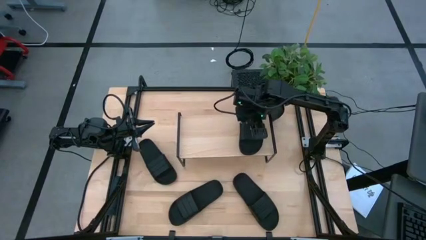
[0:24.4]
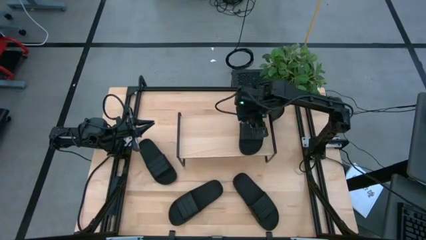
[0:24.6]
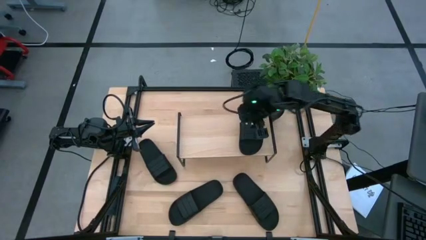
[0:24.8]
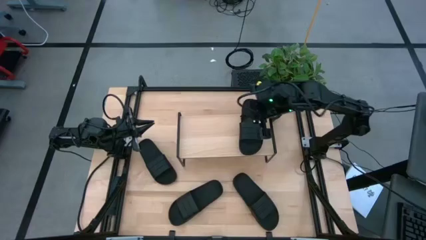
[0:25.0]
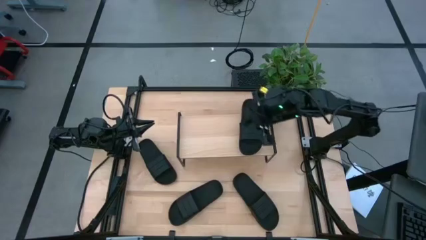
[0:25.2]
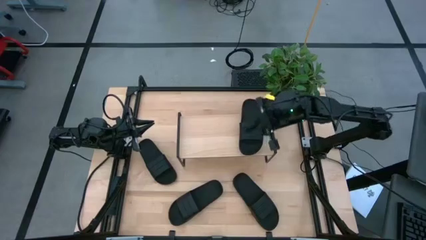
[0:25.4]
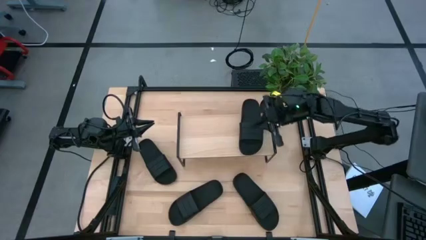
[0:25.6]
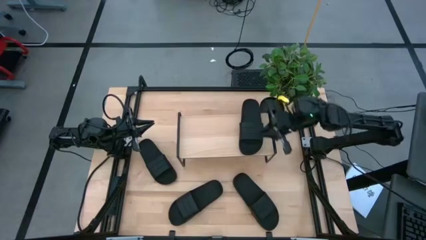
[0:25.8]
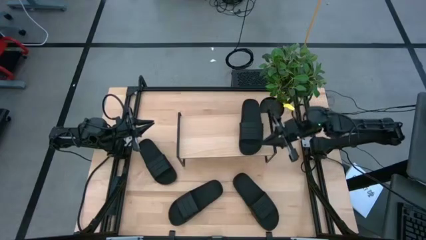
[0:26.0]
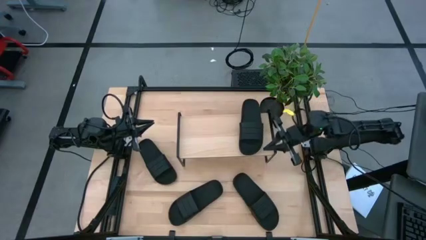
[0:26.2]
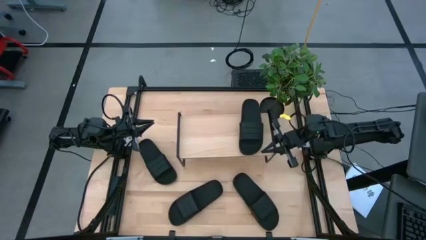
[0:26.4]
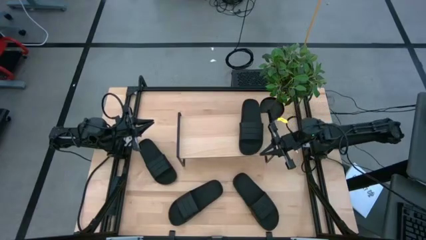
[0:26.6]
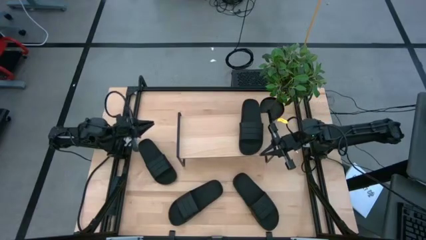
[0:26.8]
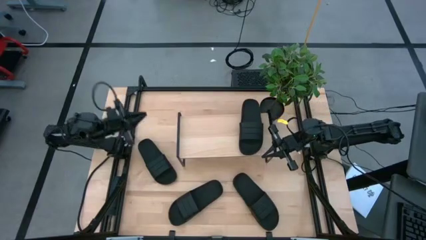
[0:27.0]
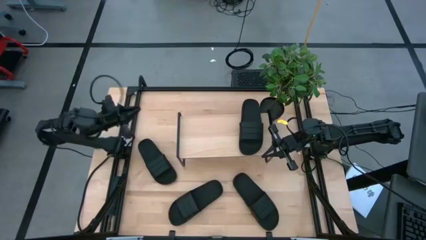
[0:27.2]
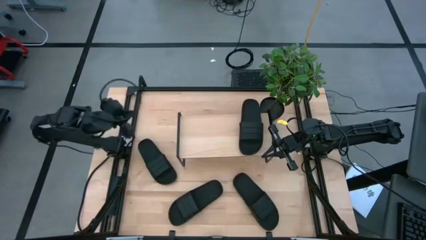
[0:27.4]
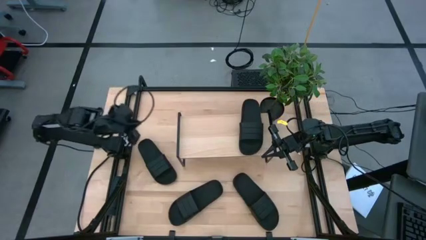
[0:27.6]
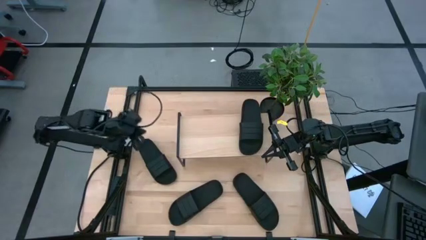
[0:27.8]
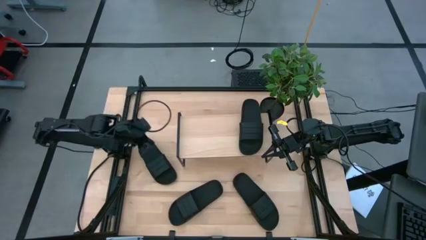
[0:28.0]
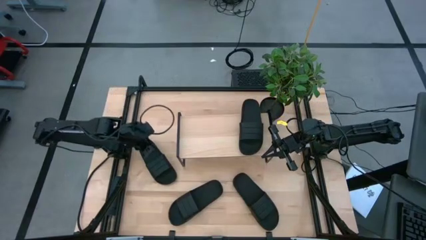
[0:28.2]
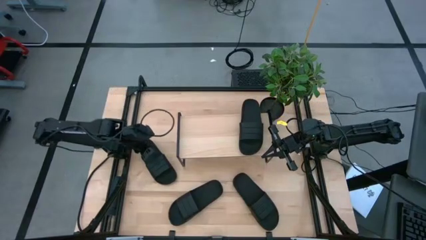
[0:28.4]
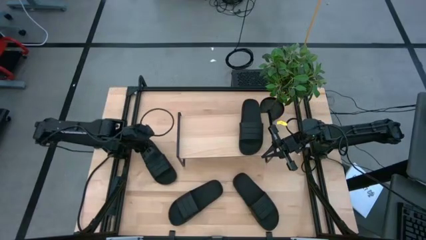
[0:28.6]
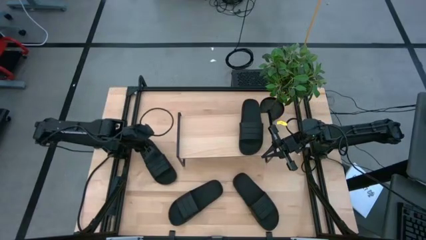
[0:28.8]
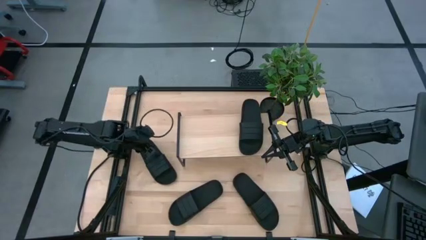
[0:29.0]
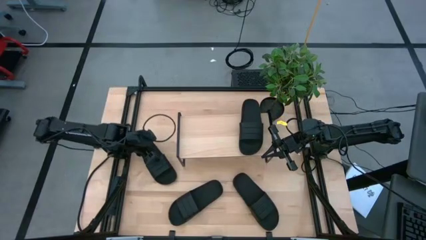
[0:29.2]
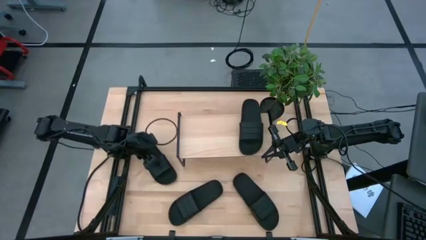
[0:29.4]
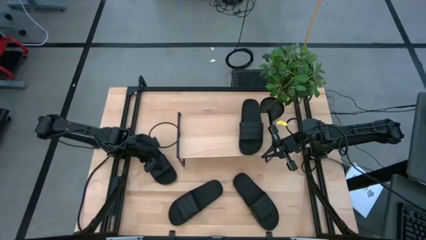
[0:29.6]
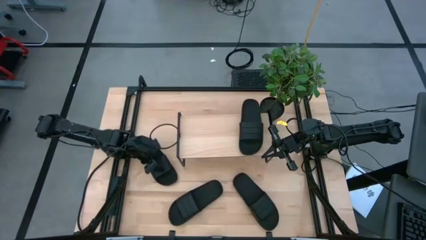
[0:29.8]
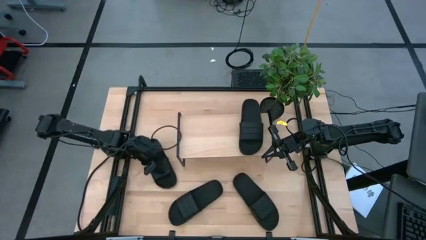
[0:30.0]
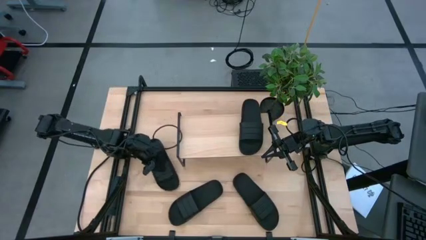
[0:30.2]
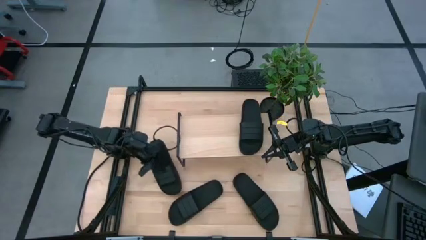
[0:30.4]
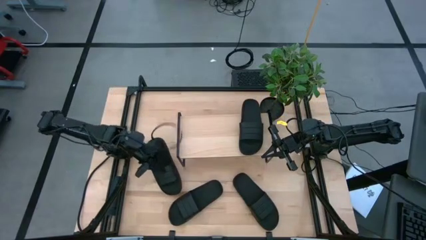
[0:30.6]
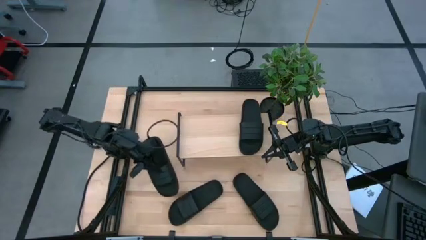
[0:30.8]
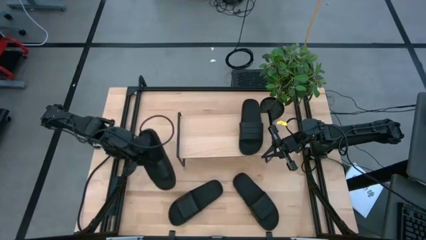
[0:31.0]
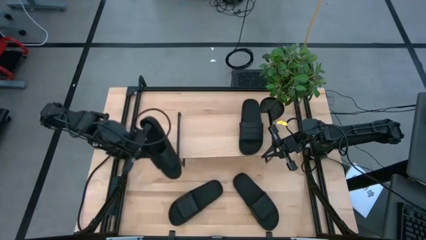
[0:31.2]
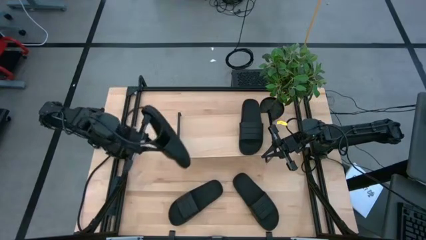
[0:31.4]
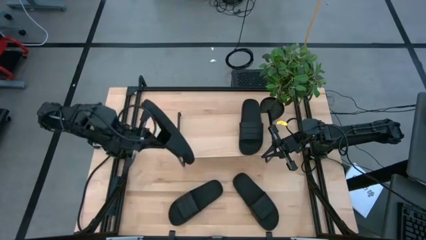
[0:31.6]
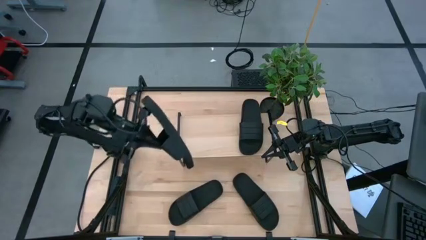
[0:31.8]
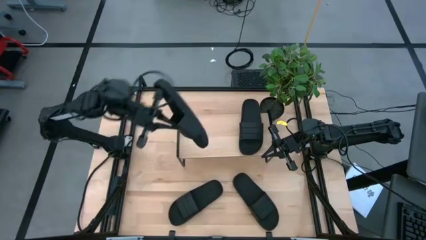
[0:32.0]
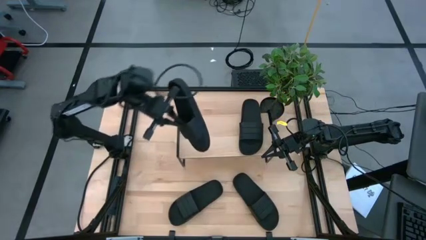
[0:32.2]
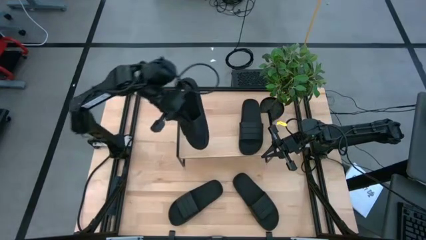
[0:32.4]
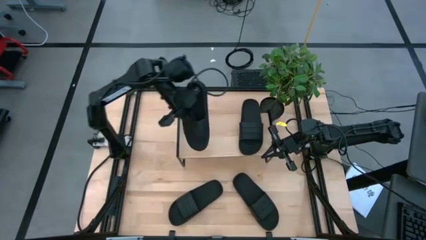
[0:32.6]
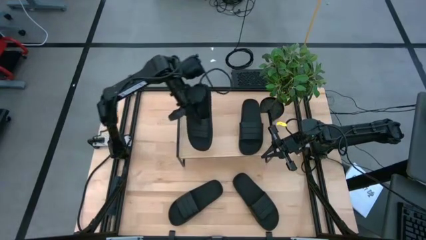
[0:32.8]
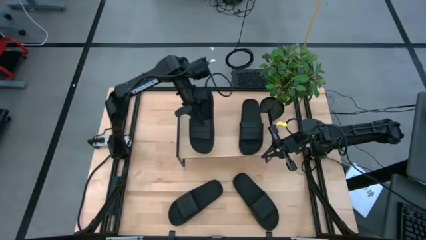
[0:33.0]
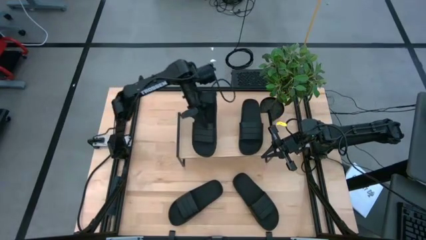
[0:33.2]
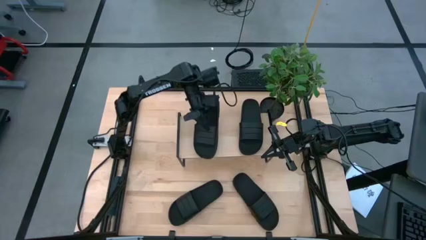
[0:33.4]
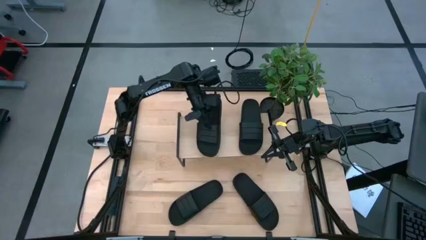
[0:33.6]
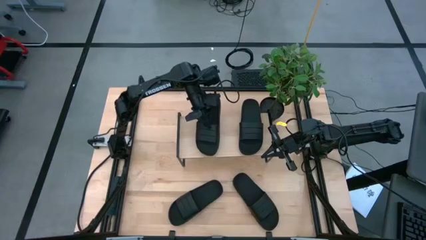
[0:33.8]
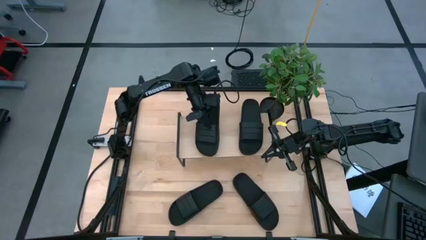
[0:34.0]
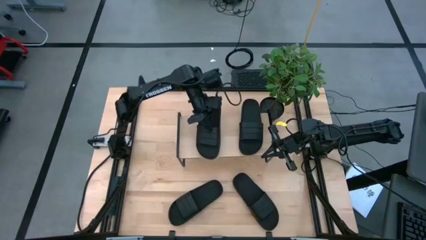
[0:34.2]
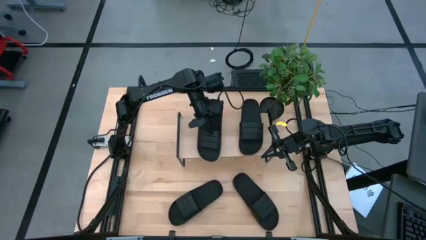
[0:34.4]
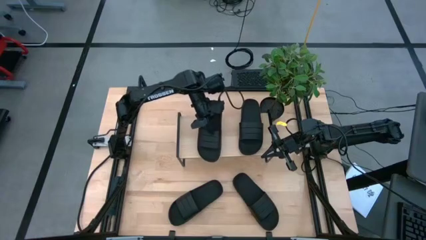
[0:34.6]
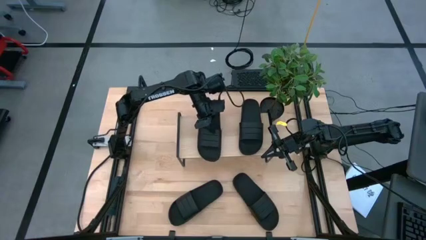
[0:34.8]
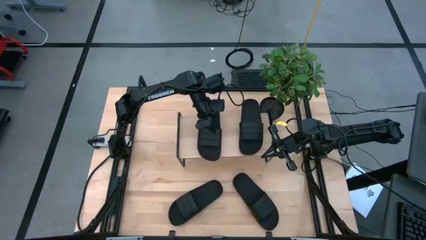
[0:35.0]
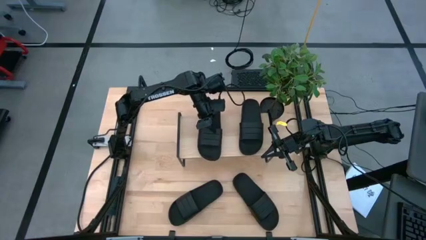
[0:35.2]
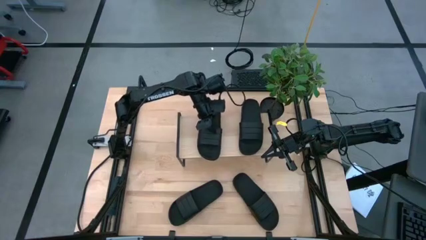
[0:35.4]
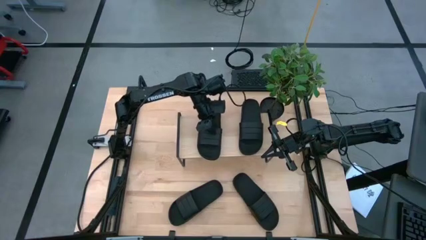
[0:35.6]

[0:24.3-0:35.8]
Task: Pick and place slides into the shelf
Put the black slides on the shelf
